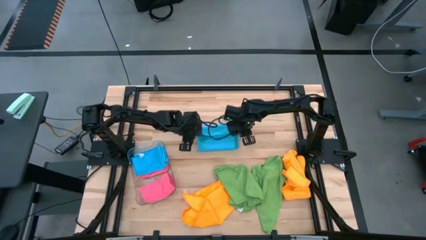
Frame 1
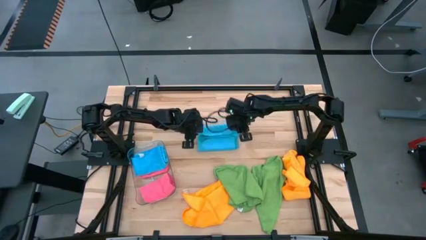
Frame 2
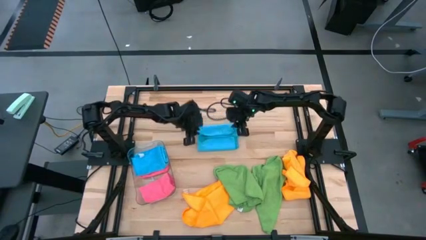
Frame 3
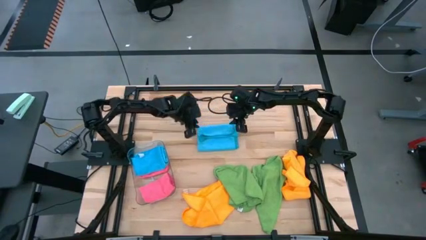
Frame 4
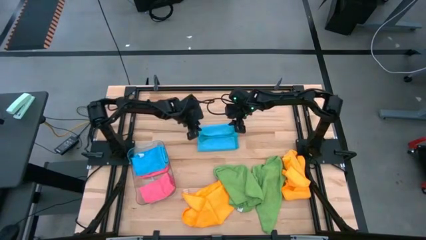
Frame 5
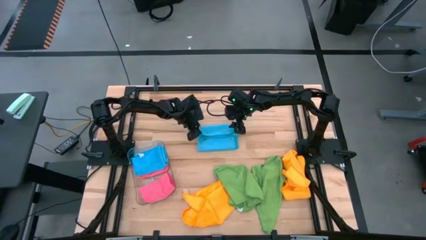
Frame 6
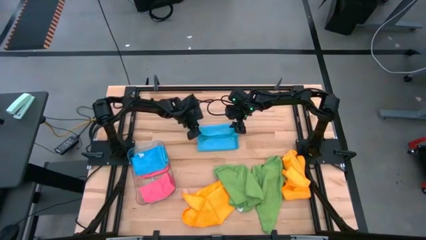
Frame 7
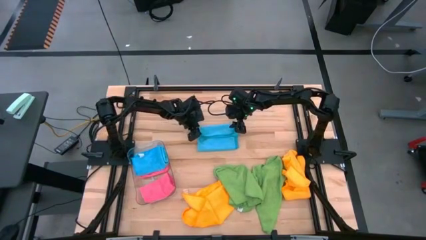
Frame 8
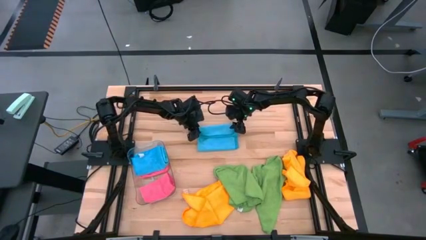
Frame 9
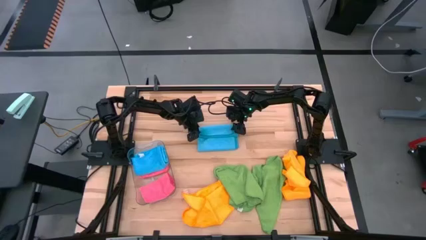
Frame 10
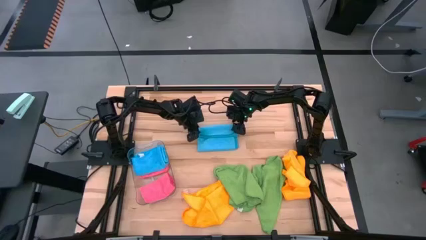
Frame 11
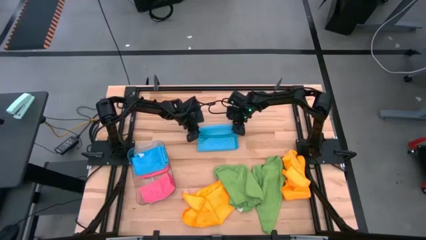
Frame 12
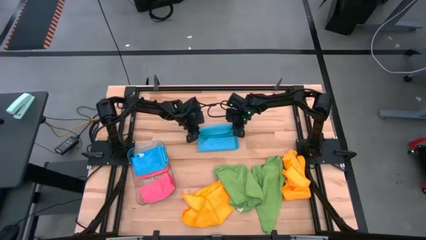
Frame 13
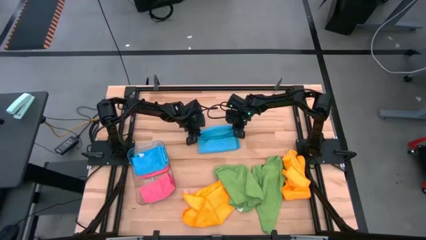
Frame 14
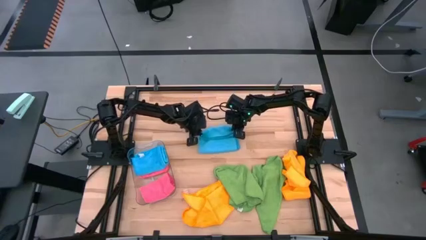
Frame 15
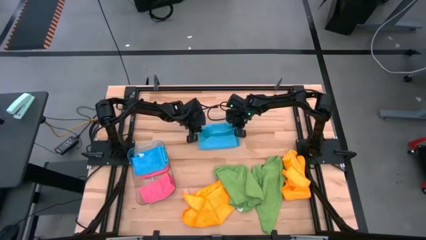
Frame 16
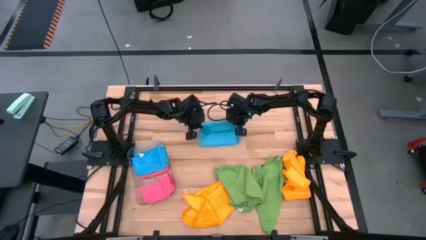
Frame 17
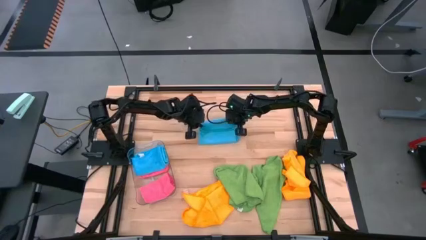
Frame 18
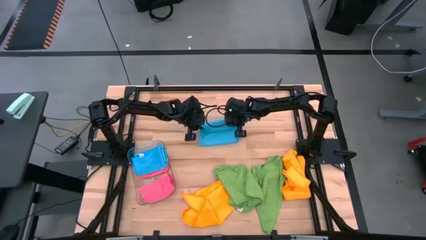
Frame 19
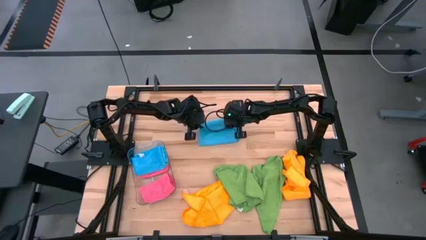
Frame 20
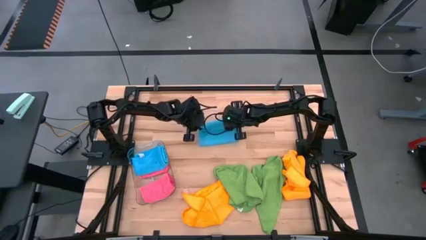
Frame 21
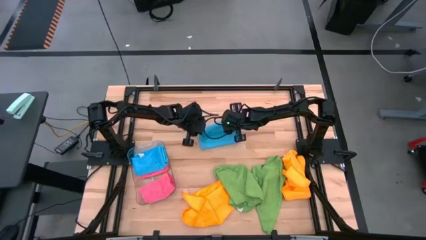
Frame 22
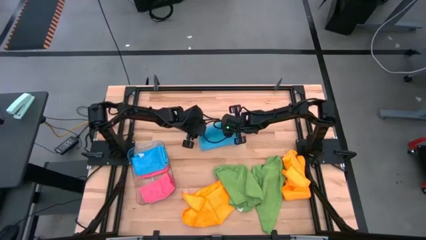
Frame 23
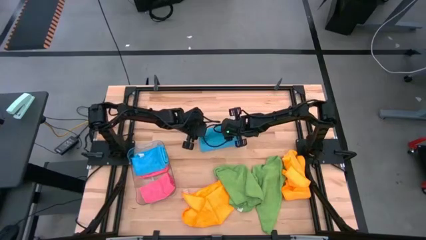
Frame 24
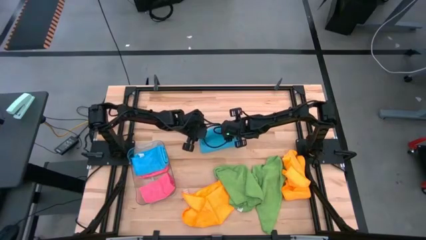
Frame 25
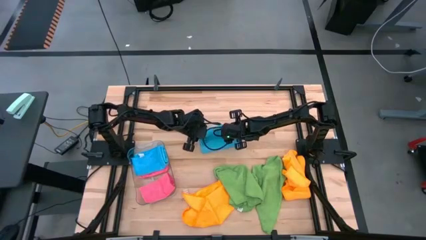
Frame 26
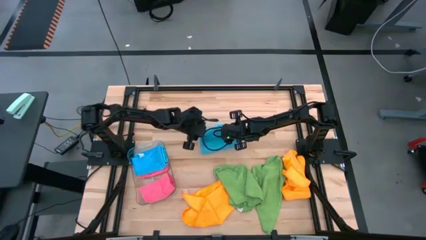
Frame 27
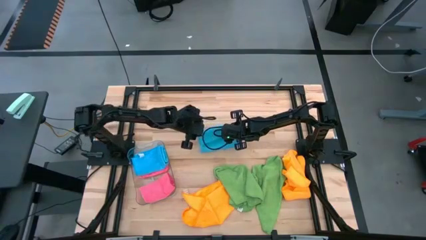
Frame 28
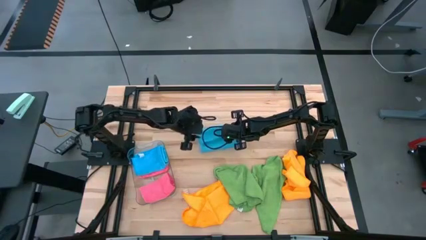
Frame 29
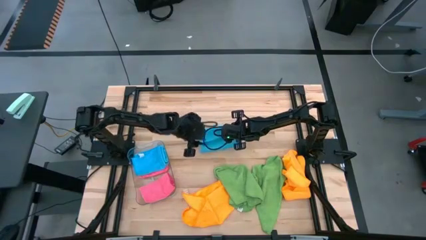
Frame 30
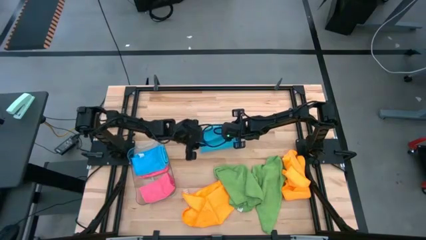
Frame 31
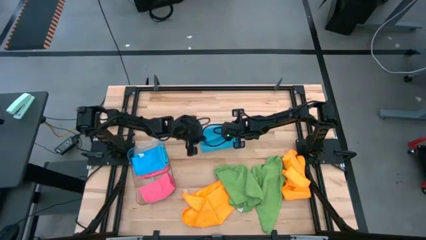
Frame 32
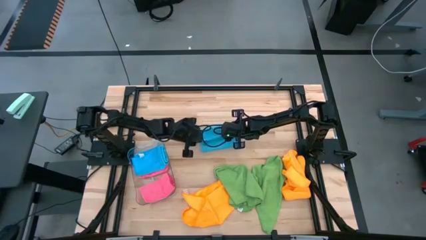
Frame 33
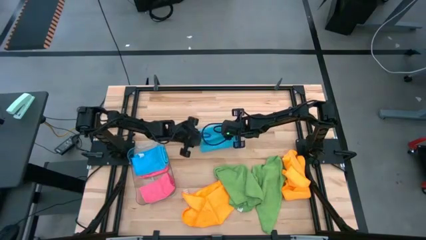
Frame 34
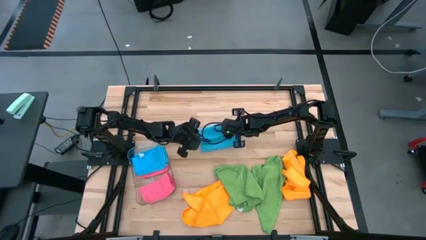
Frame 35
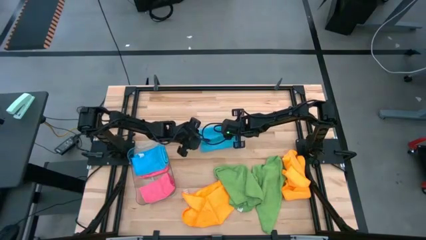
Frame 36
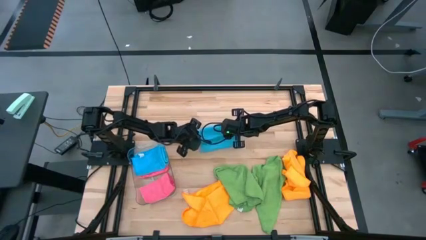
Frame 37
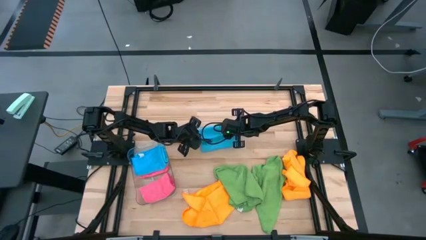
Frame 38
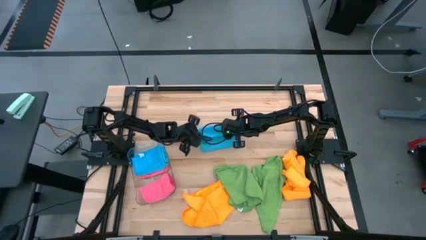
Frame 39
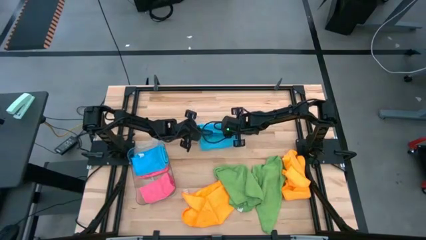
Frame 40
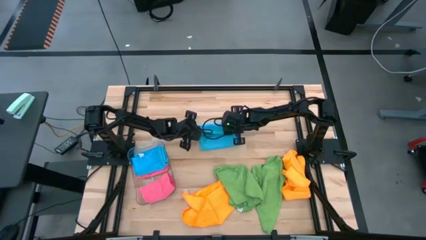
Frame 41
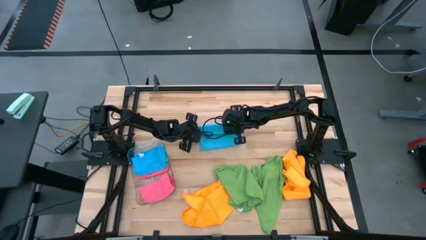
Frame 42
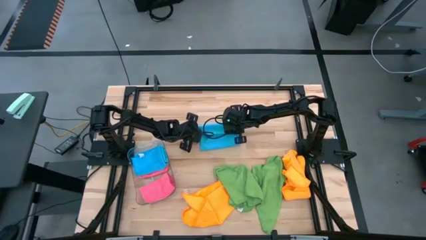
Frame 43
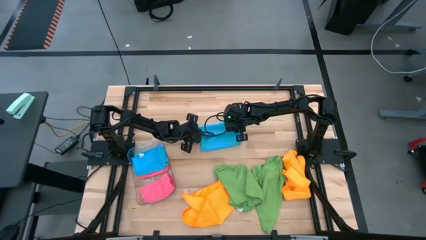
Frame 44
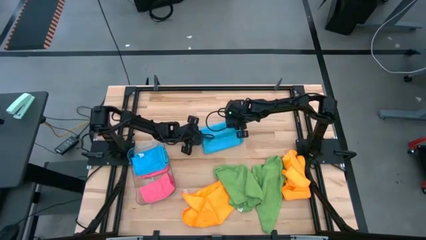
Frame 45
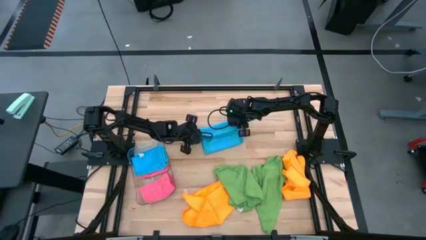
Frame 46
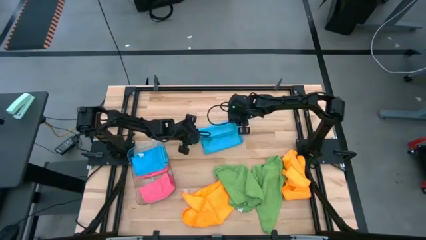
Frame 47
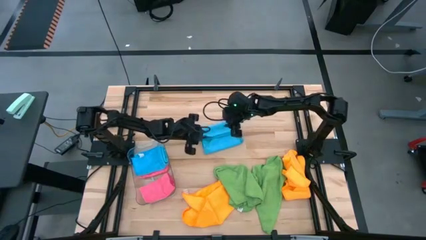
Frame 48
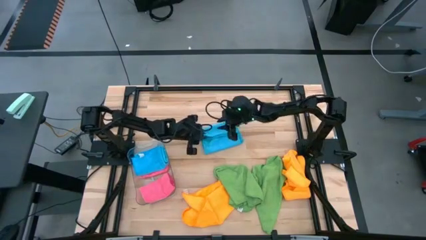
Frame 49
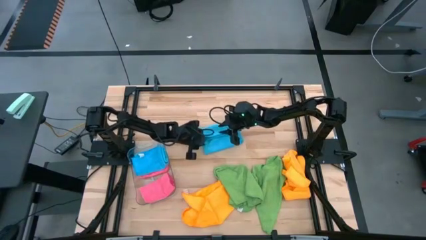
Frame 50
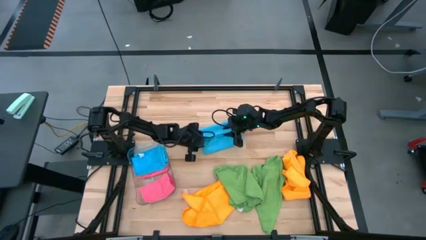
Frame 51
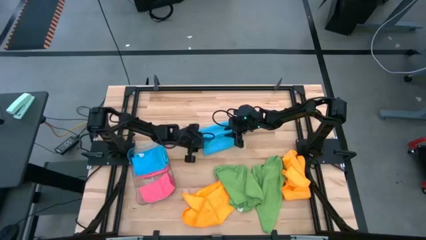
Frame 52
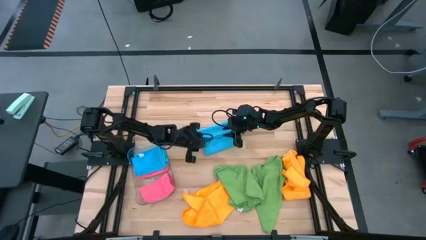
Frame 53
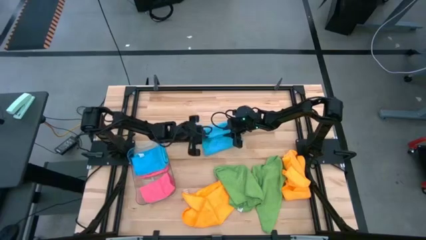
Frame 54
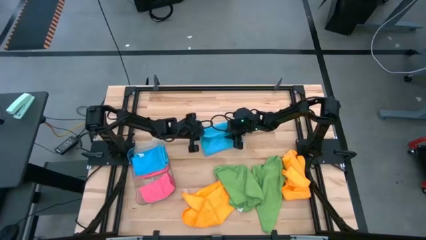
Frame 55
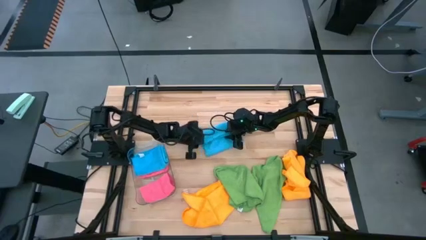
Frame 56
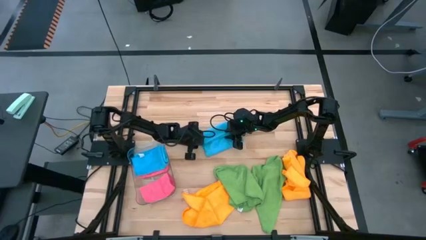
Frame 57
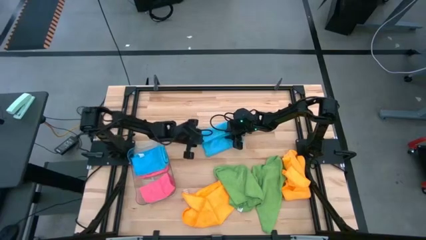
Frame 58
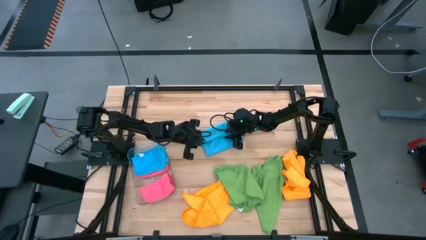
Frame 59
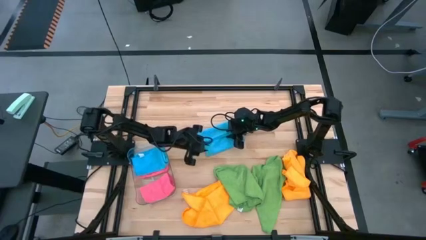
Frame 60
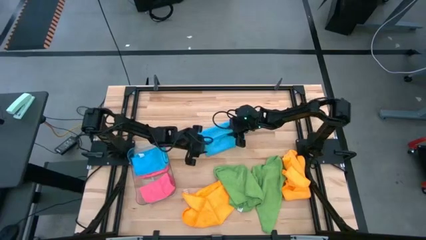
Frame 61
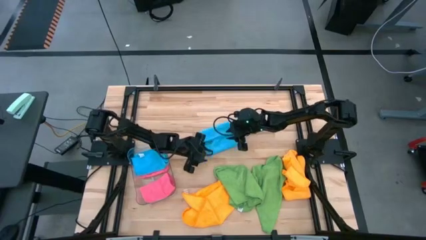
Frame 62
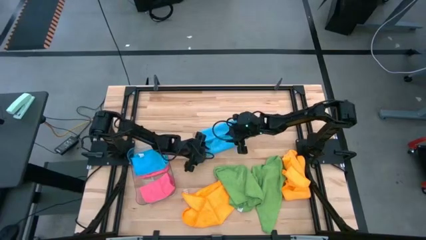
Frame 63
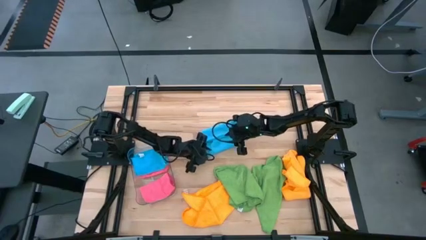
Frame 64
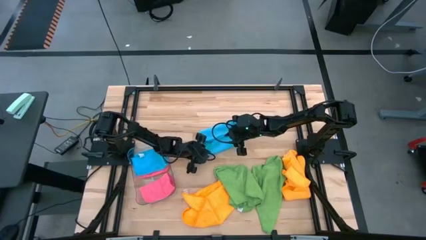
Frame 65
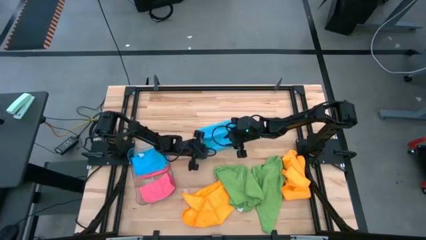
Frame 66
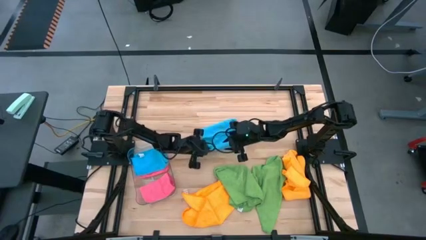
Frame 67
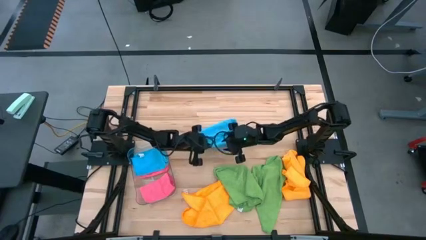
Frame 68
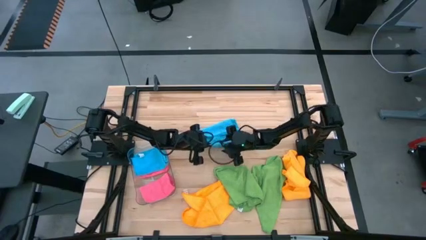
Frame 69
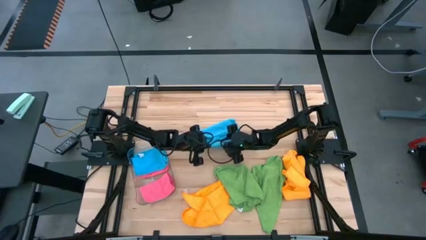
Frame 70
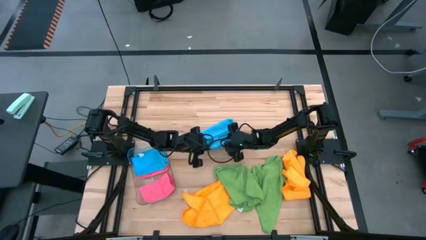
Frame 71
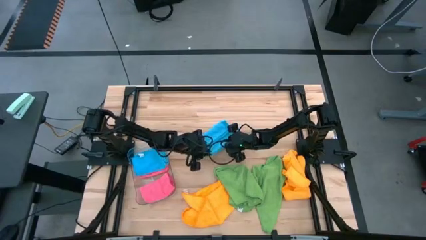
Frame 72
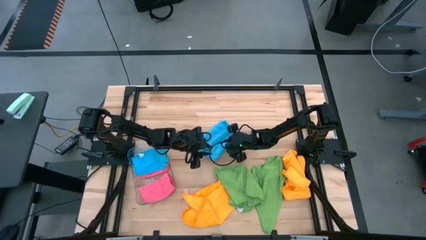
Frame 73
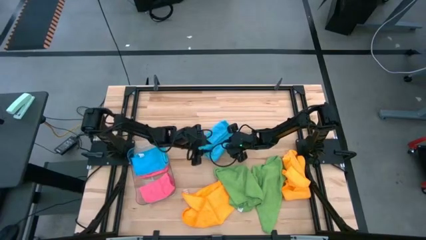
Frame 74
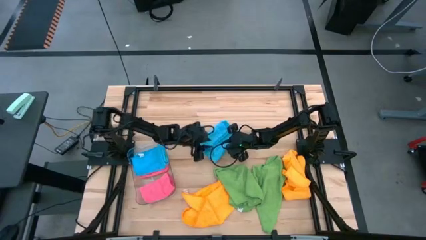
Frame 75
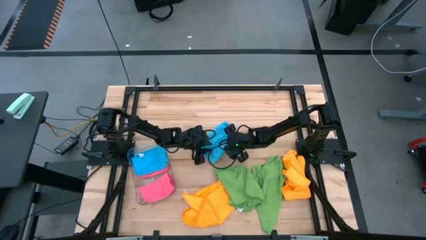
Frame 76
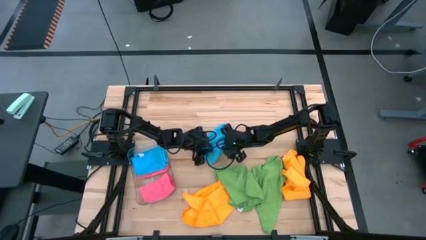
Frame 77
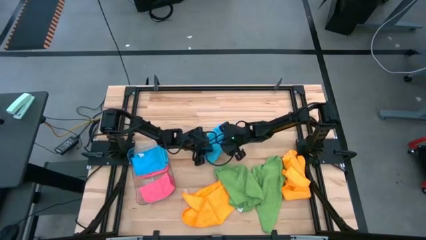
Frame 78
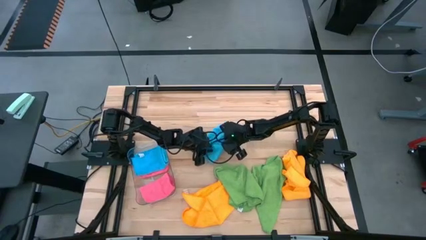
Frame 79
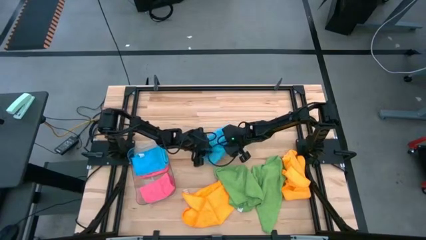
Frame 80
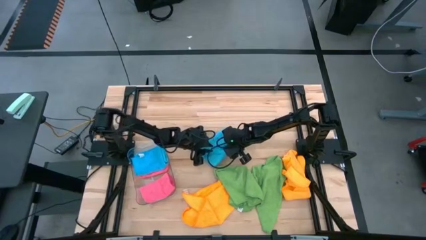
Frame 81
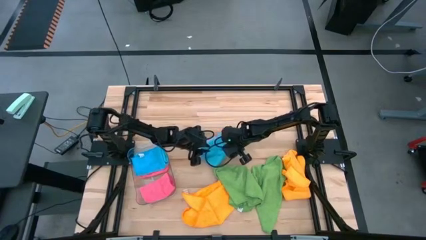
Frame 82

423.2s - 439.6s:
Task: Fold microfiber towels
Fold the blue microfiber cloth
